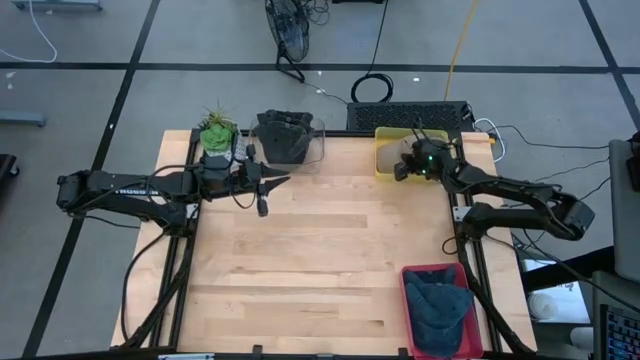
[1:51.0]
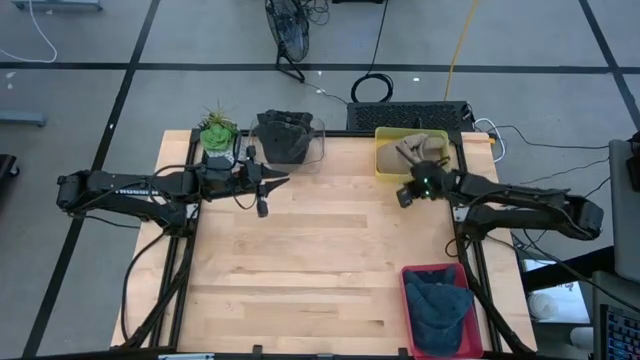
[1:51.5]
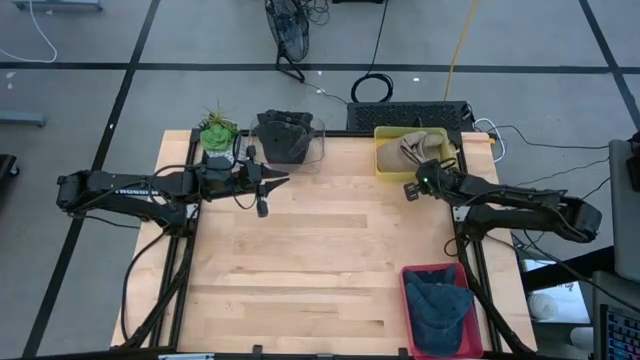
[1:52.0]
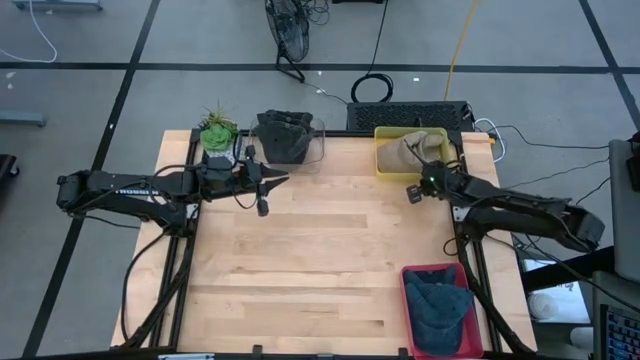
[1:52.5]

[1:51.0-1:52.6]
Task: Pick & Place hat
Adjust the yellow bin

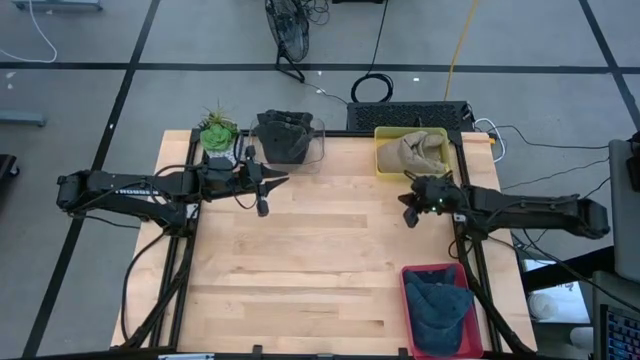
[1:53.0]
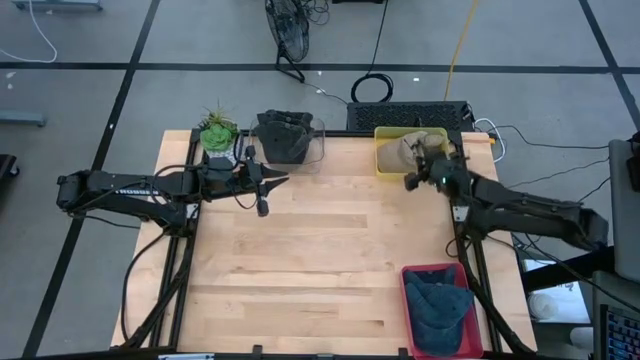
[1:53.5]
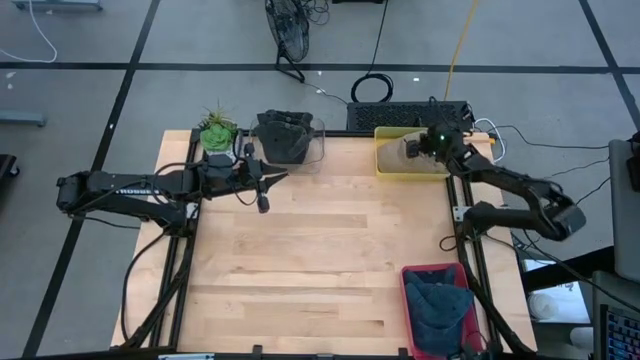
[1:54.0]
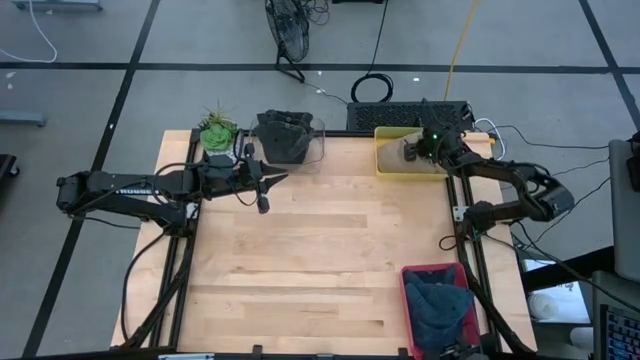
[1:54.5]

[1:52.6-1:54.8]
Adjust the brown cap in the yellow bin

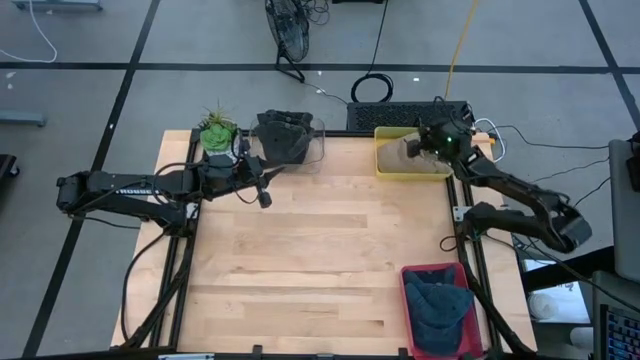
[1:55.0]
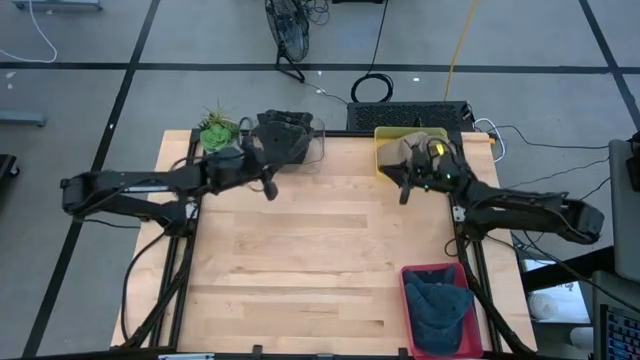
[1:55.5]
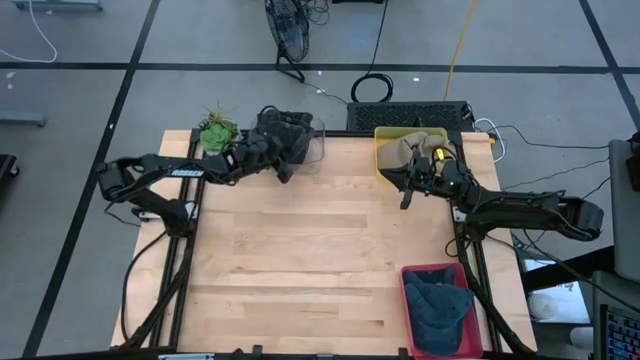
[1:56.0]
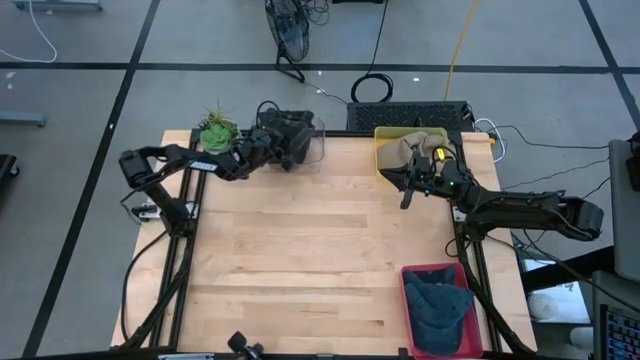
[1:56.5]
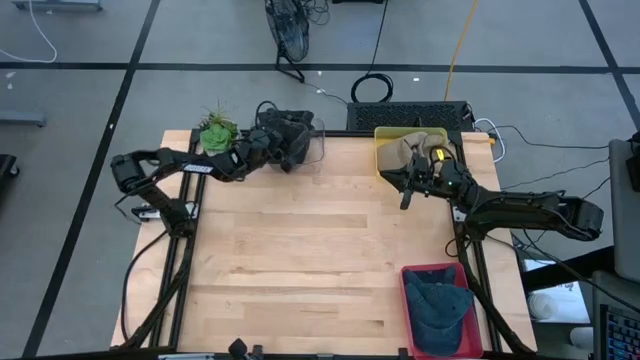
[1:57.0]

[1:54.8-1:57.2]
Adjust the black cap

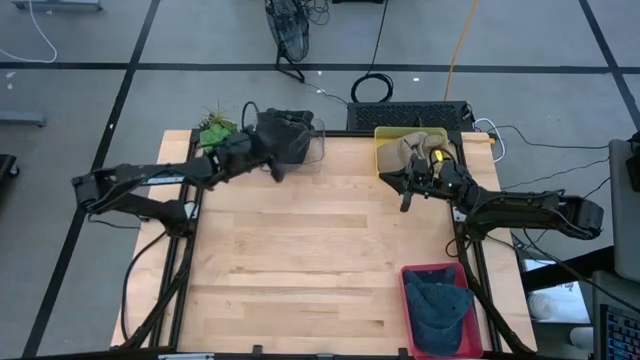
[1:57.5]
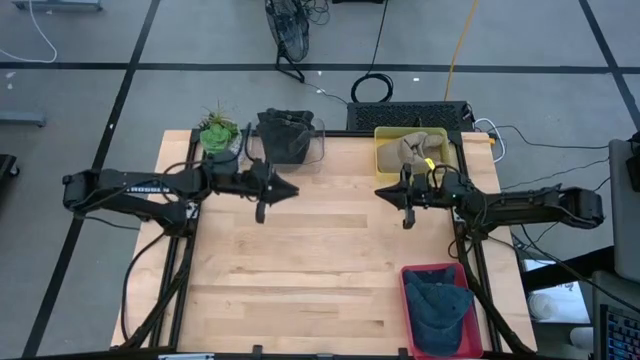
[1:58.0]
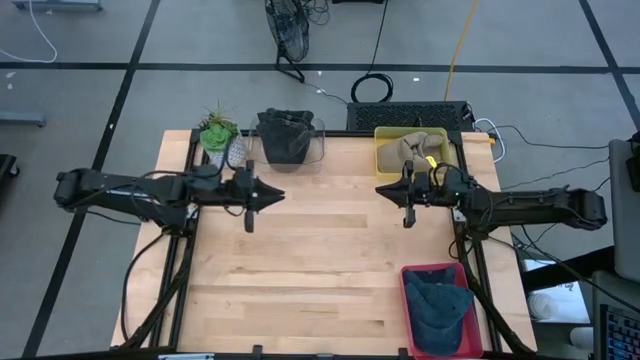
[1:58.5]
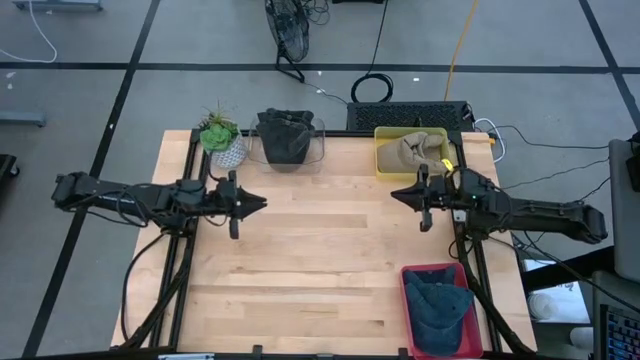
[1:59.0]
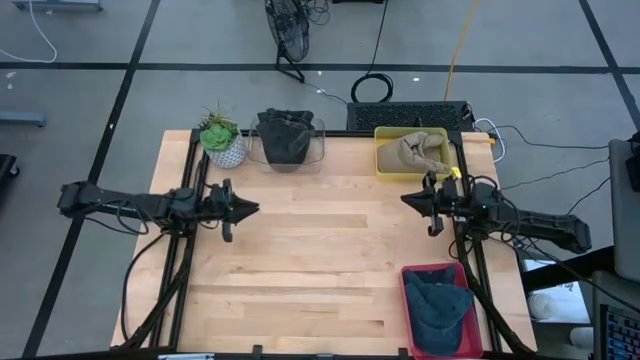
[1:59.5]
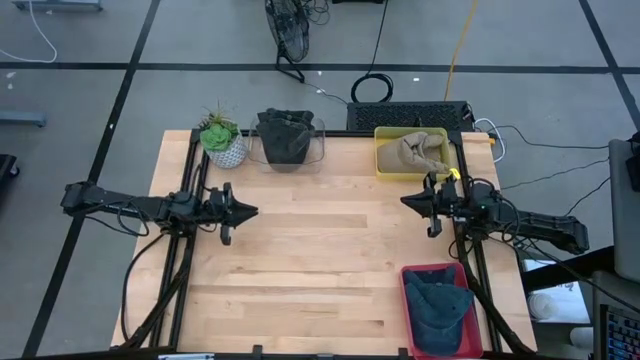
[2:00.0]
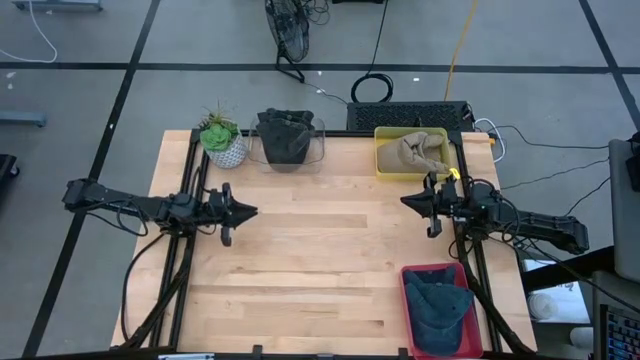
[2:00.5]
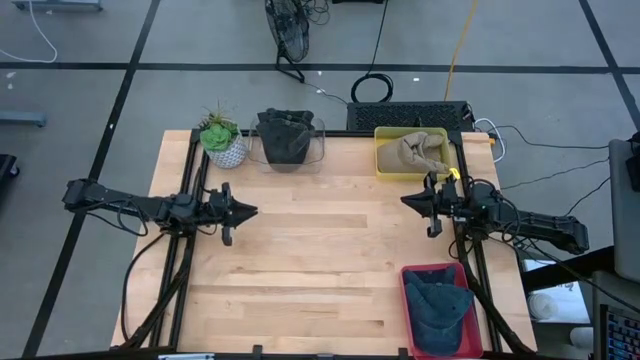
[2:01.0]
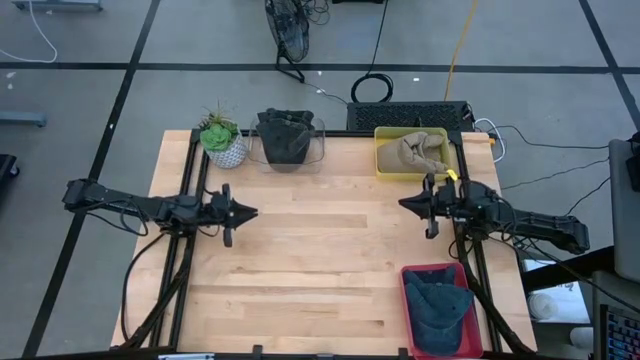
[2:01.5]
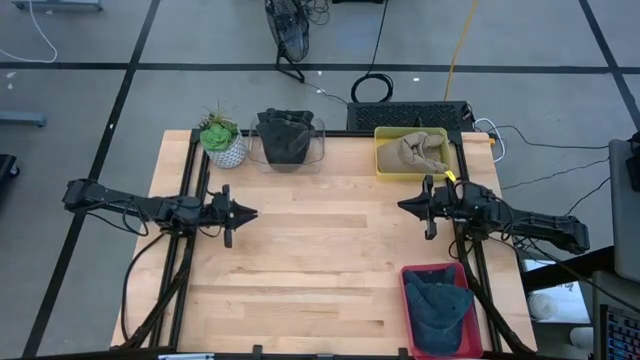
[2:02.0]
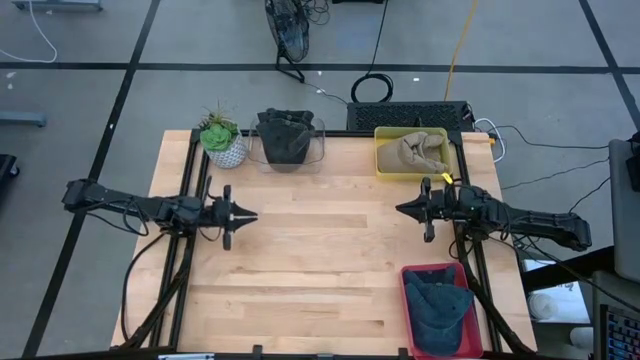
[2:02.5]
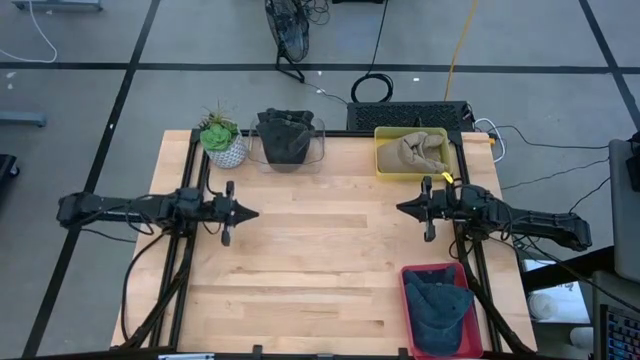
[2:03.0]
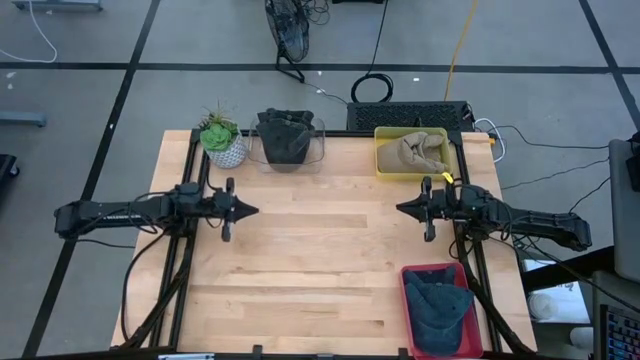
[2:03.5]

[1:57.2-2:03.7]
Return to Home Position

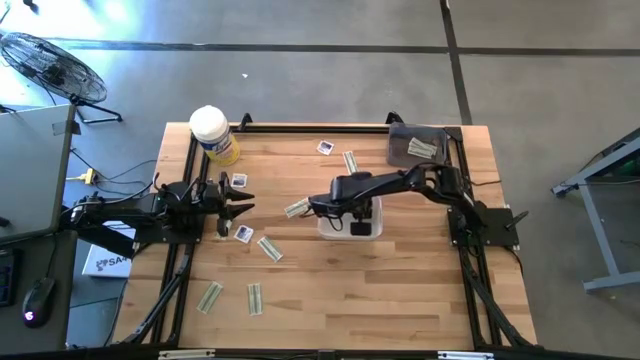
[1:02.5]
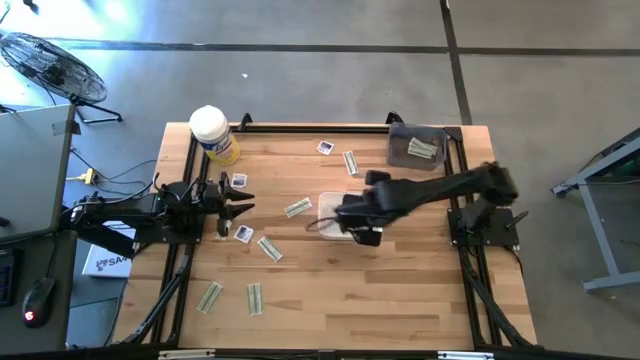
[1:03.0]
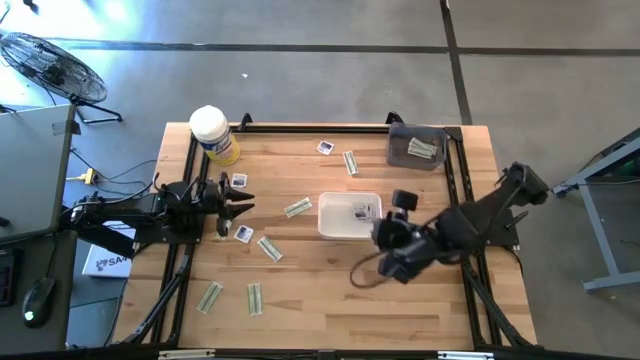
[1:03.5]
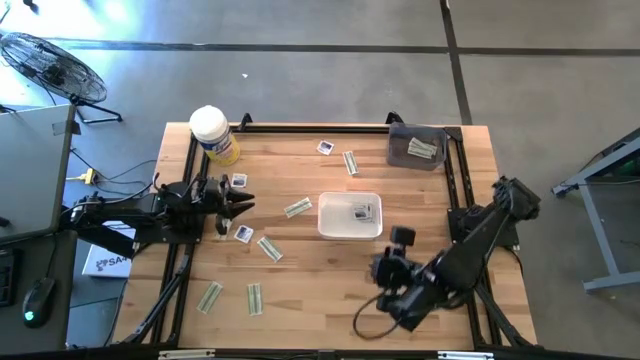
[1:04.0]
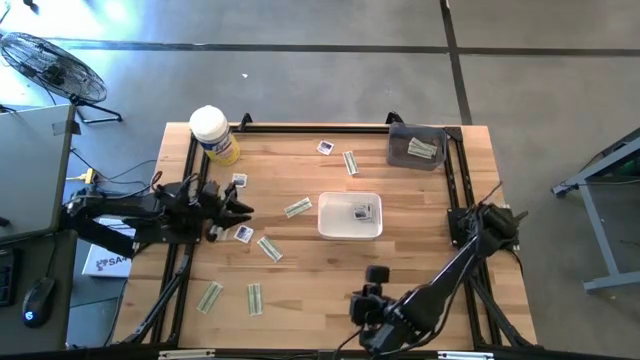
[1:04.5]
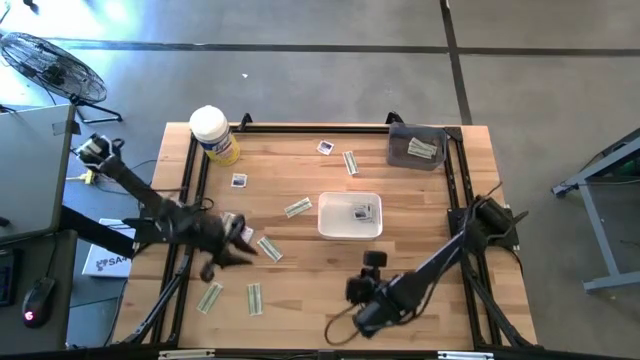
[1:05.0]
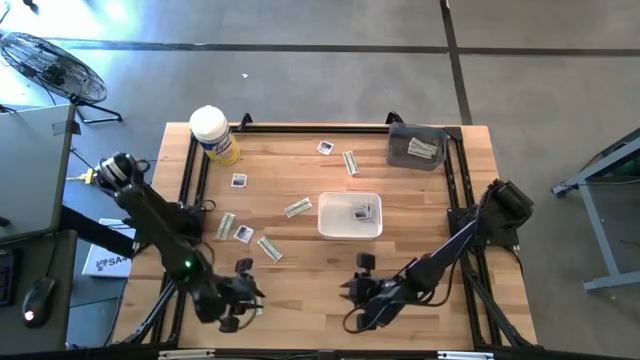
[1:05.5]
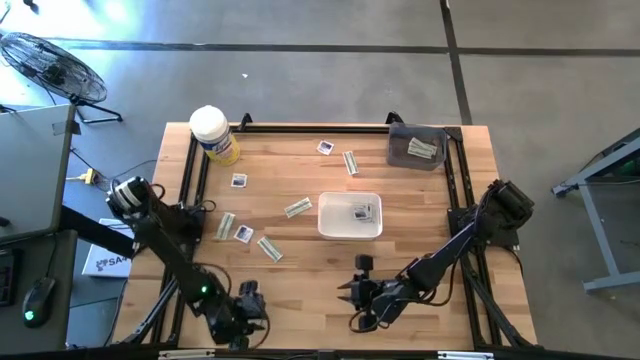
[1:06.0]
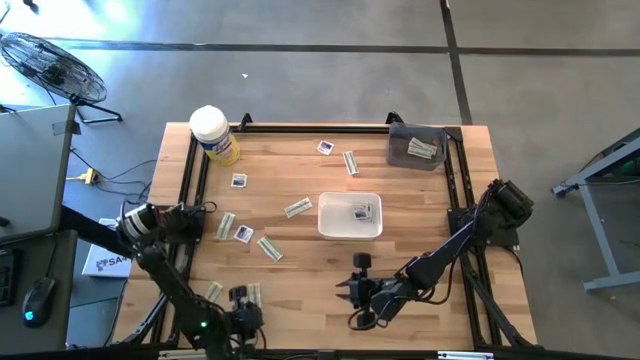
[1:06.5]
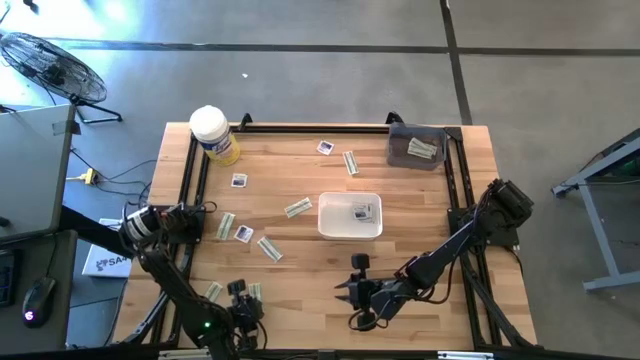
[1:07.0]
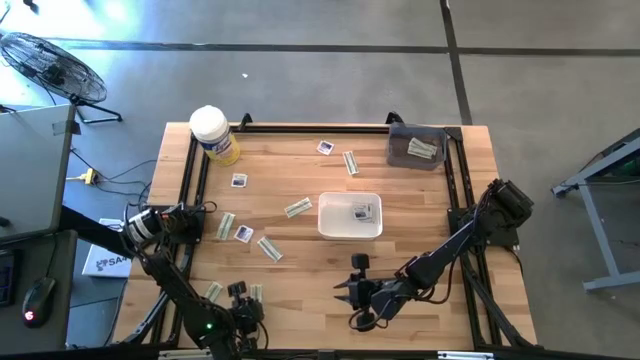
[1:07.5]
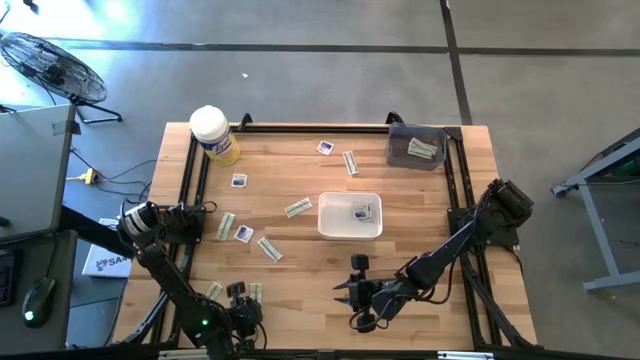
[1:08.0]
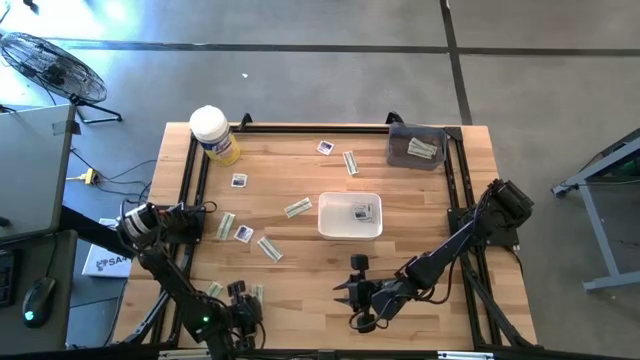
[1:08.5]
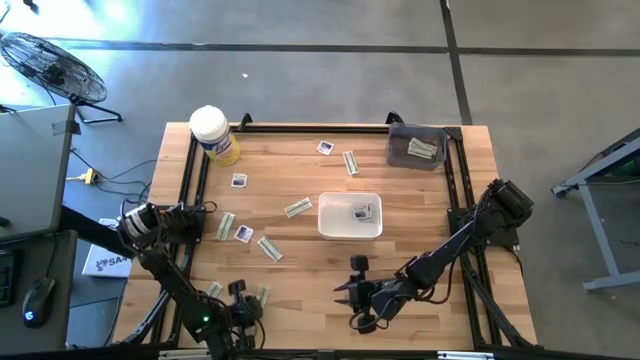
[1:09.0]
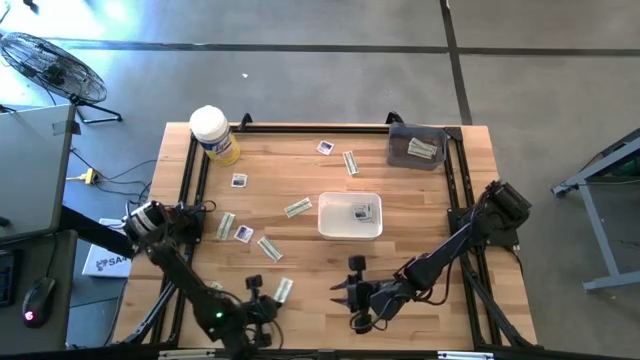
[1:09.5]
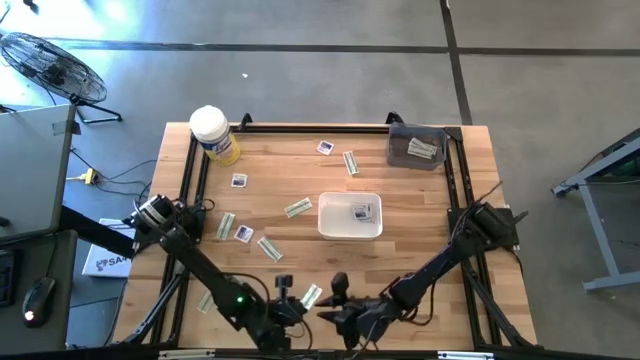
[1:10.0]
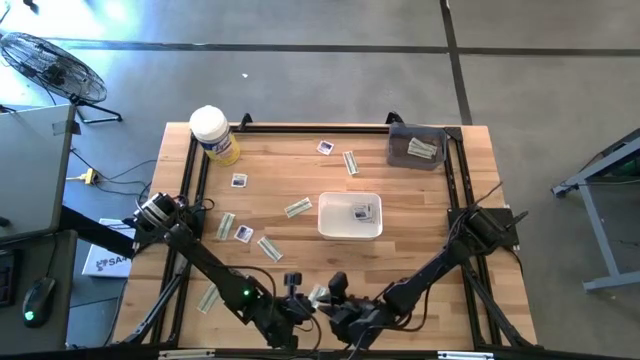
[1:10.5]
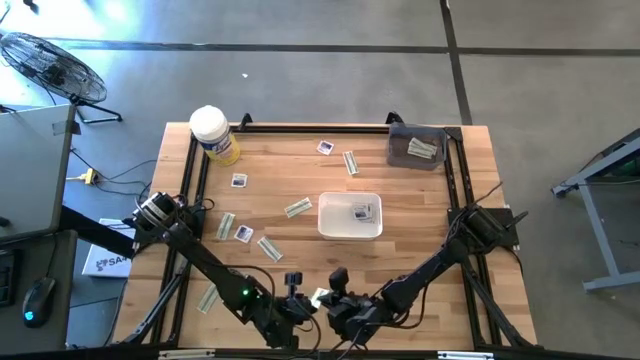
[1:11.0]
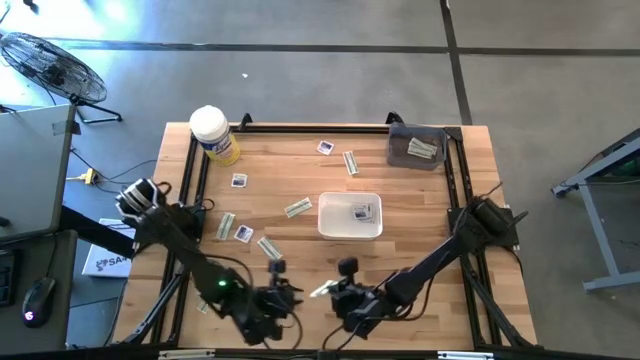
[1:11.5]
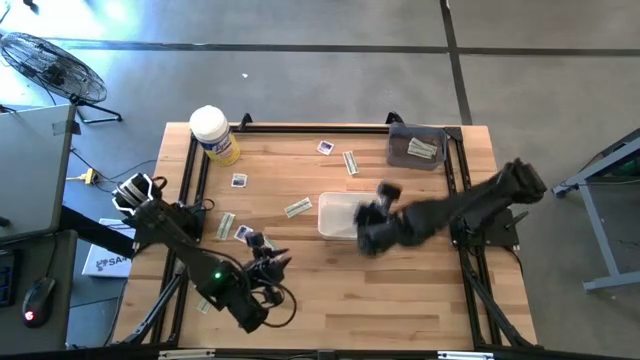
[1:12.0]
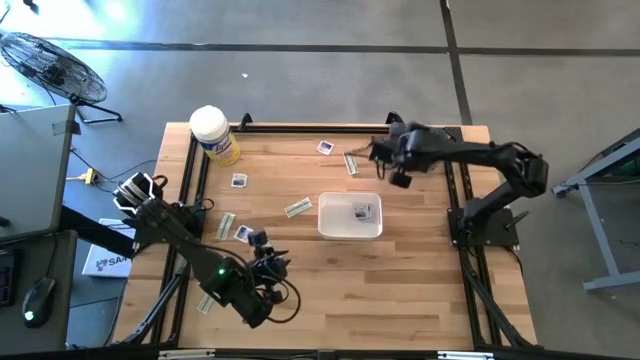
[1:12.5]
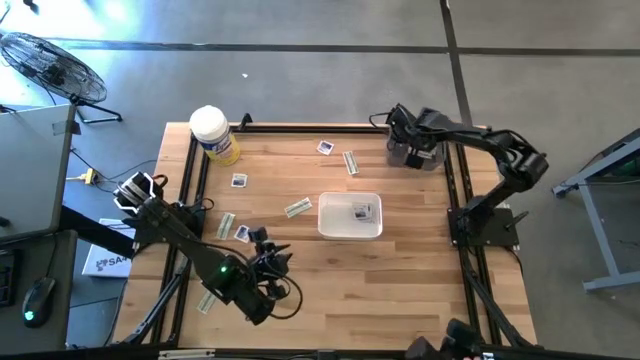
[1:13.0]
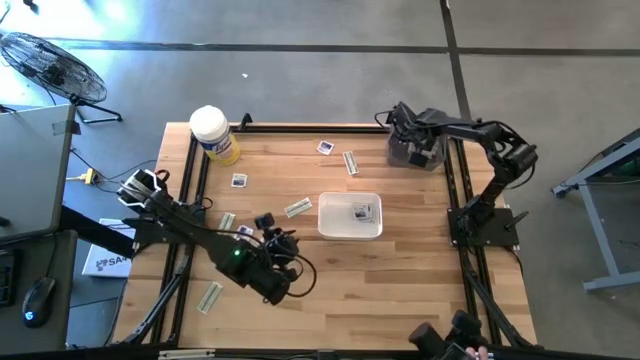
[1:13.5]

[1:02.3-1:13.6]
Task: Pick & Place First Aid Supplies
Put the green bandage into the black bin
